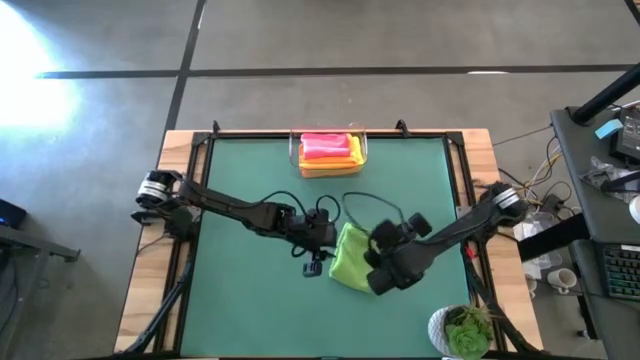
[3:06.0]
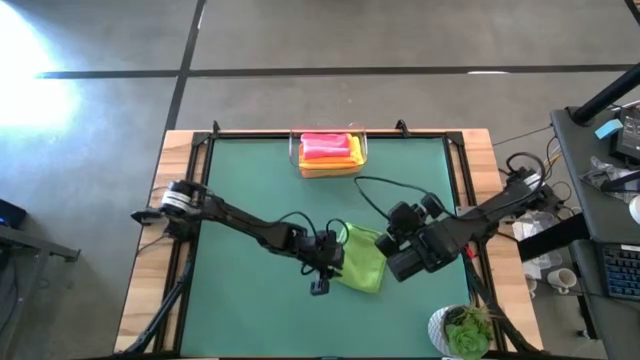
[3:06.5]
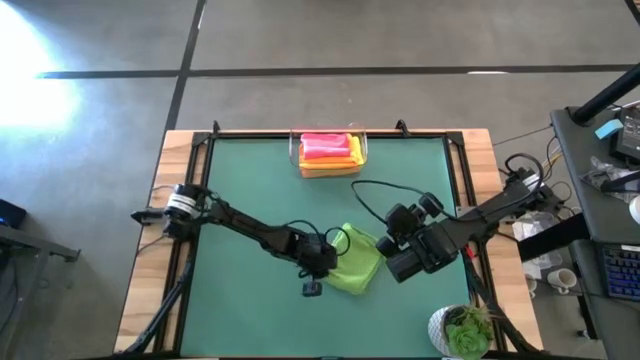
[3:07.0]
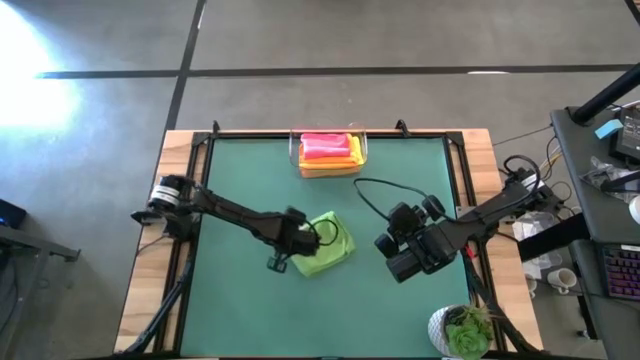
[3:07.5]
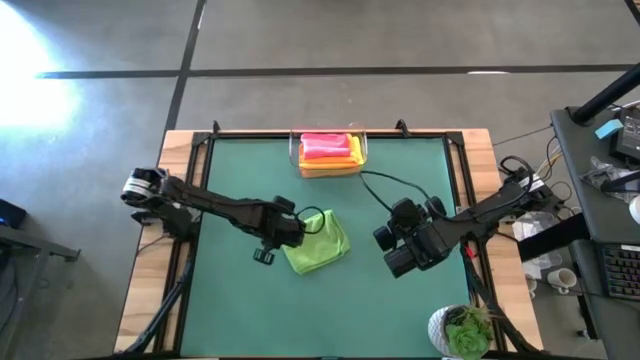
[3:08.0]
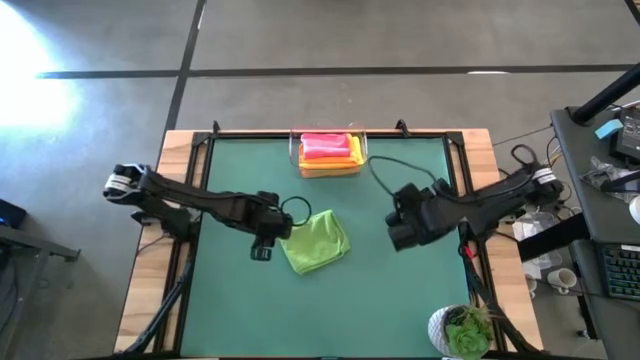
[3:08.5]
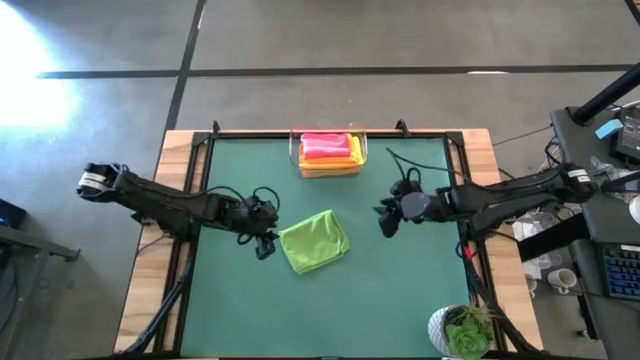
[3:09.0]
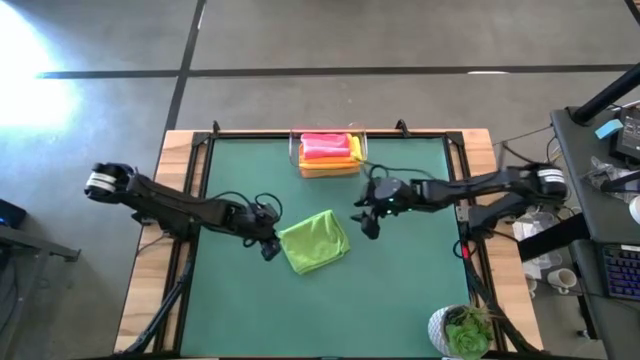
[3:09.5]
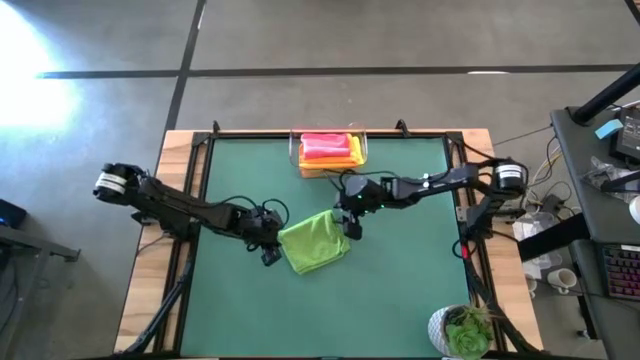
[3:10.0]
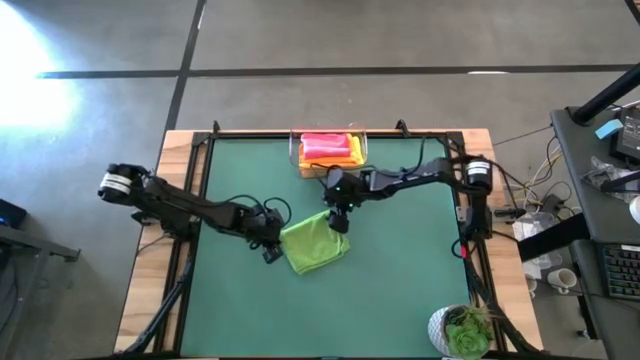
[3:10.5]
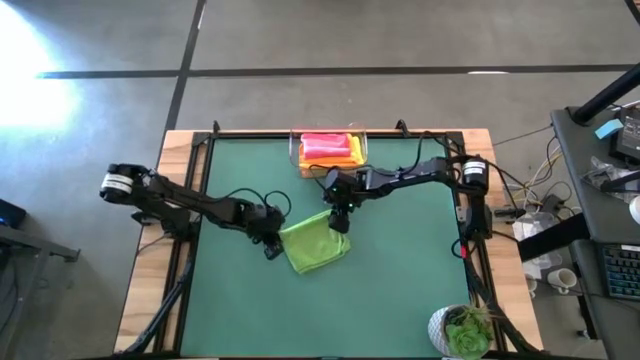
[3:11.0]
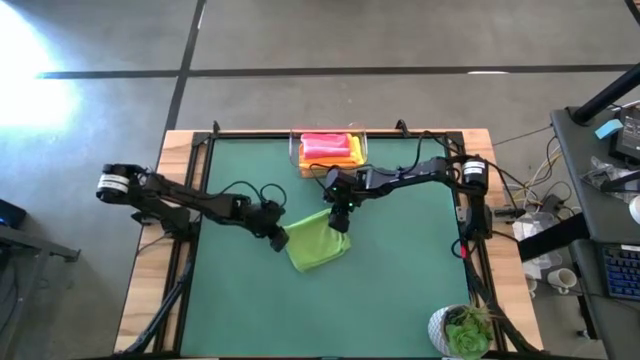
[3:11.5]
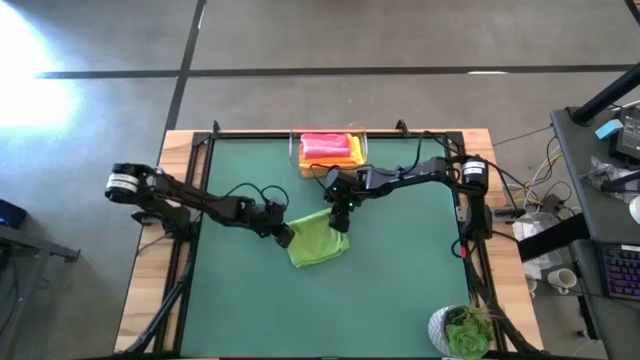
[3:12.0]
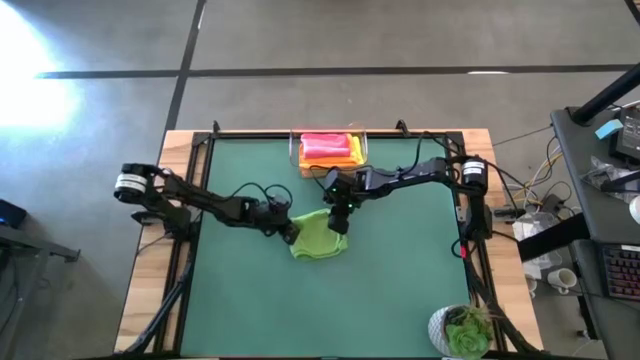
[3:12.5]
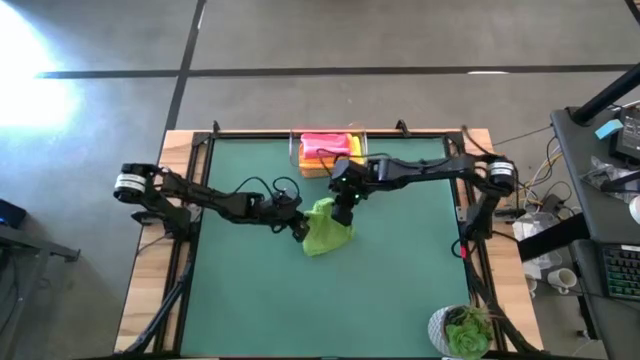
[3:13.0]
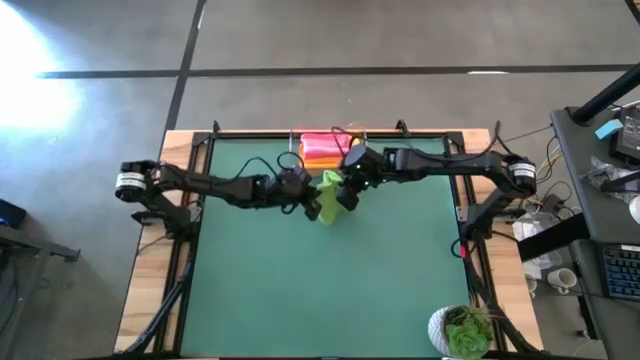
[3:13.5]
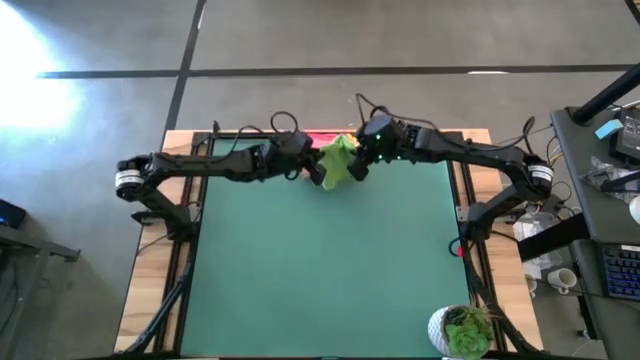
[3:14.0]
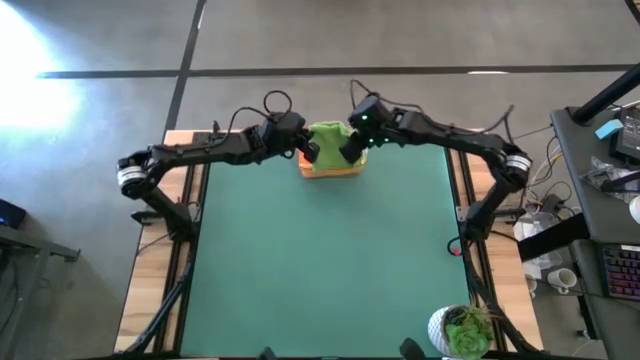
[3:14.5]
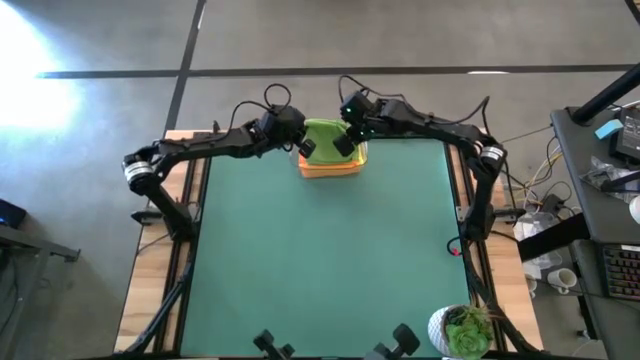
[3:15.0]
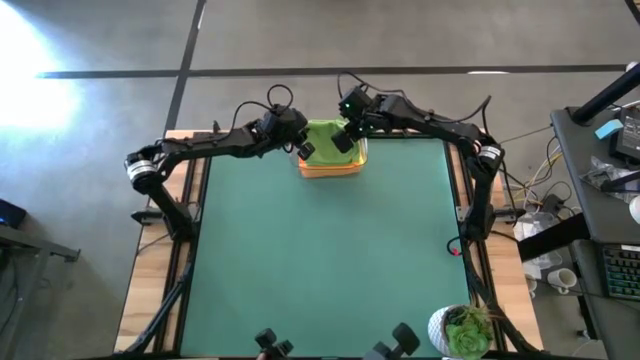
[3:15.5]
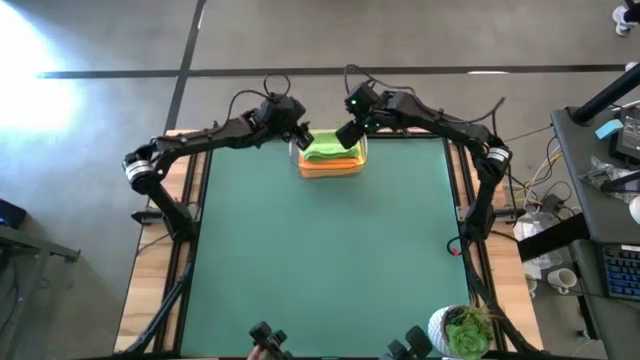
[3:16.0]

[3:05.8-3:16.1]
Task: Fold microfiber towels
Stack the green microfiber towel on top of the pink microfiber towel

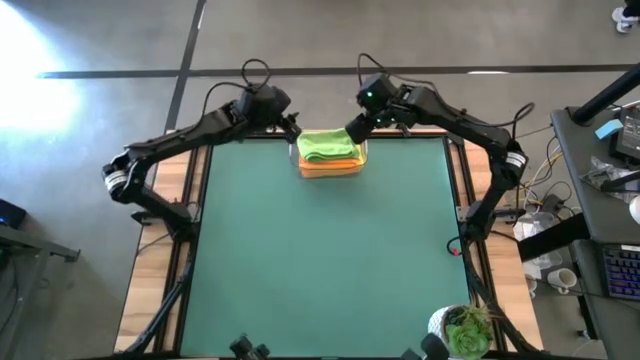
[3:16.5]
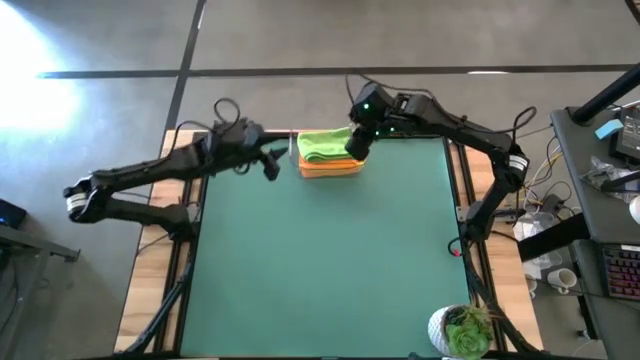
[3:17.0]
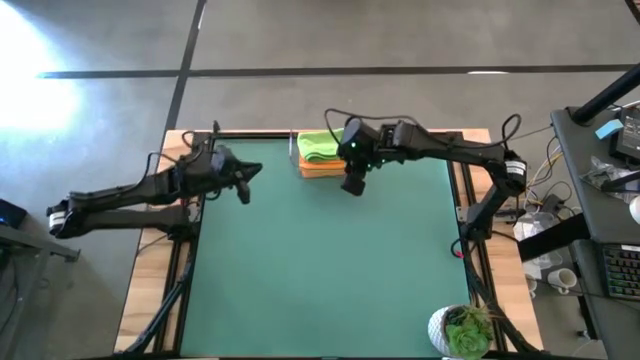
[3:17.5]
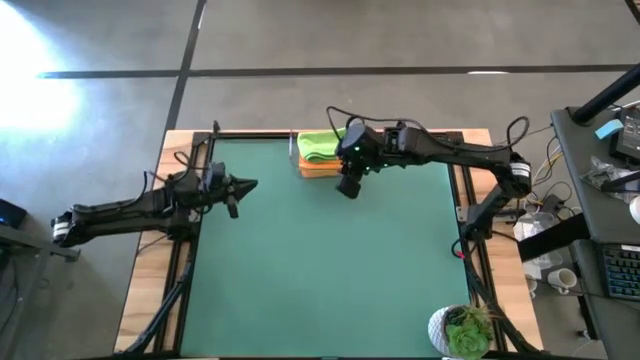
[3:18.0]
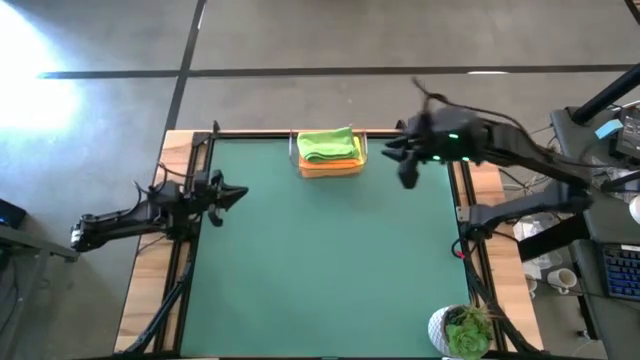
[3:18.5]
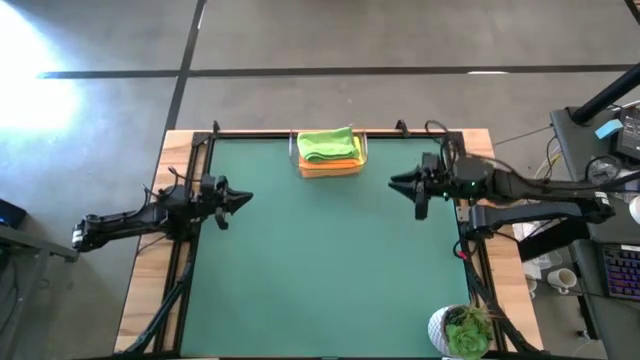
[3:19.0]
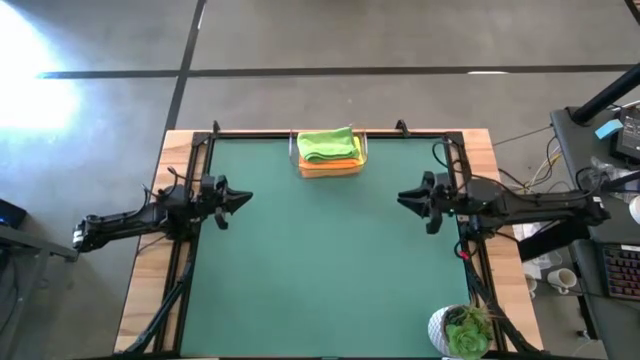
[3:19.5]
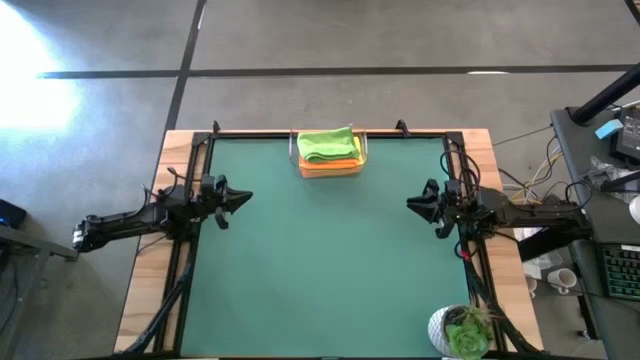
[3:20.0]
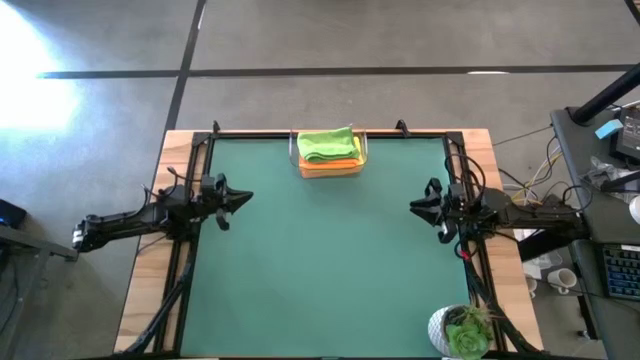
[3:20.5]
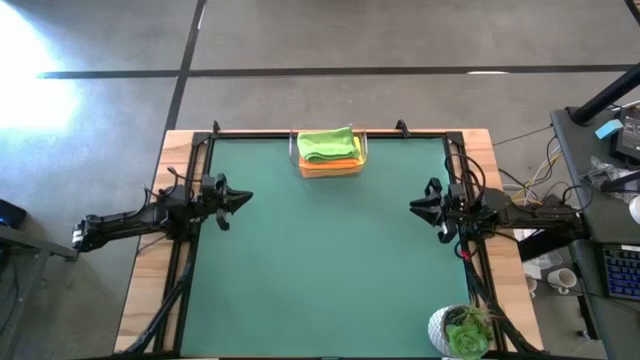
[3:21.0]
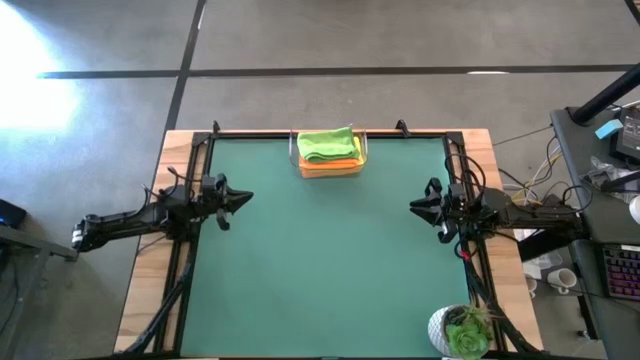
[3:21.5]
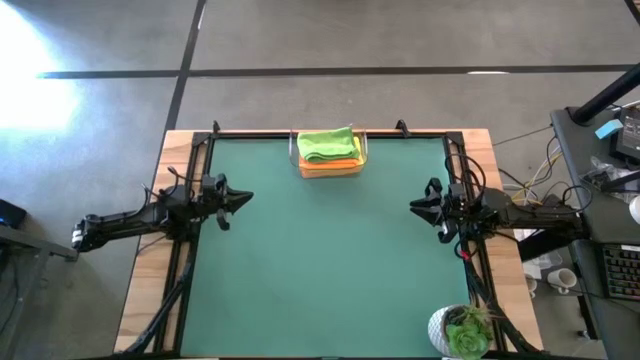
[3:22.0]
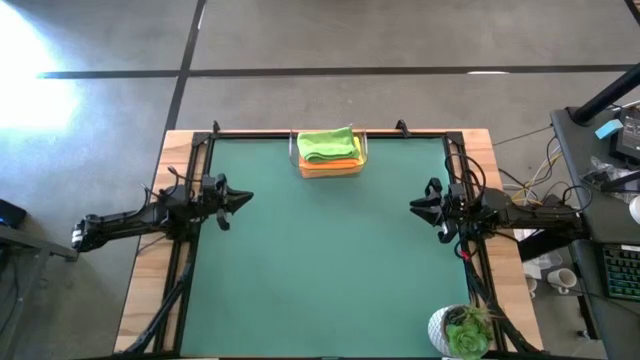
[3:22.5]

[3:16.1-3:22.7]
Return to Home Position

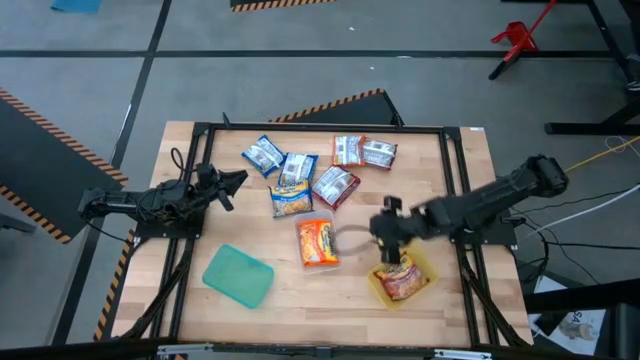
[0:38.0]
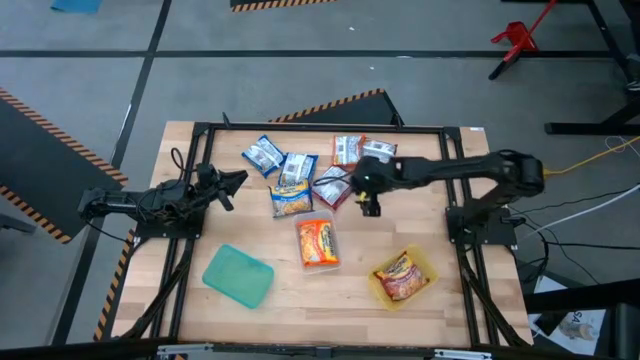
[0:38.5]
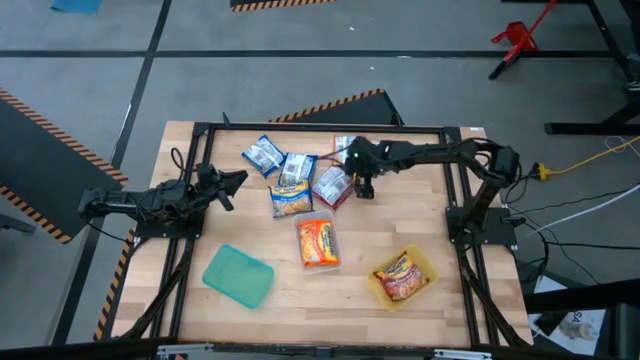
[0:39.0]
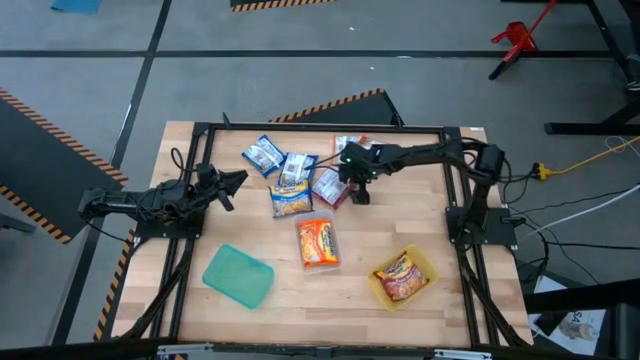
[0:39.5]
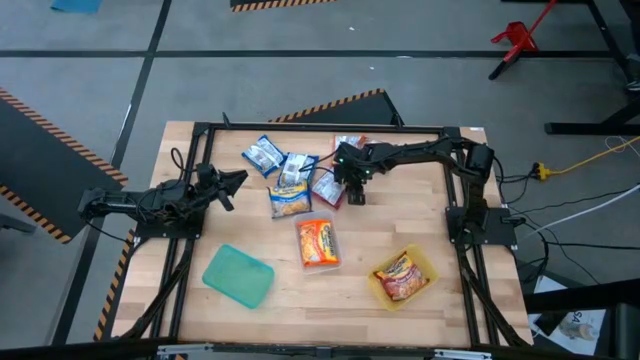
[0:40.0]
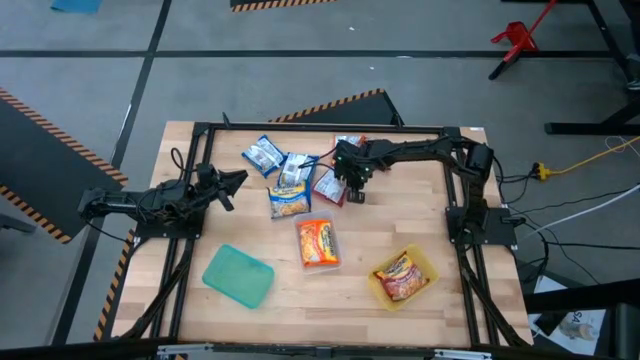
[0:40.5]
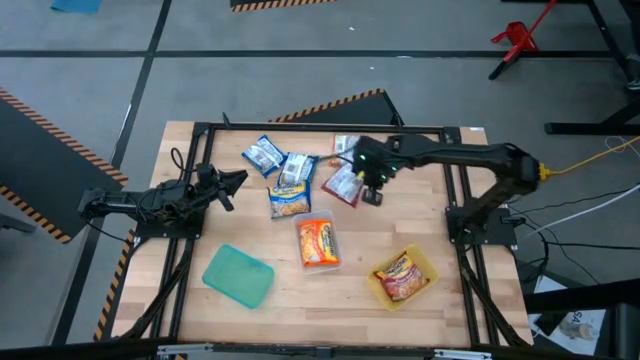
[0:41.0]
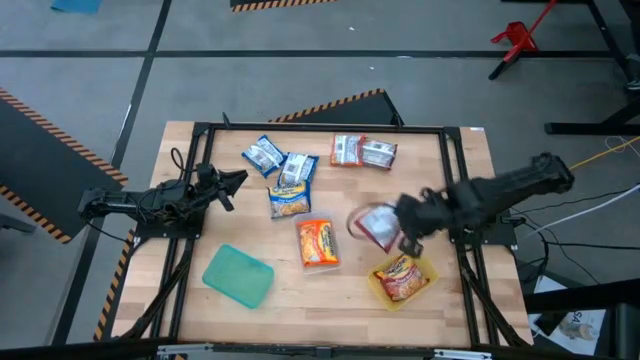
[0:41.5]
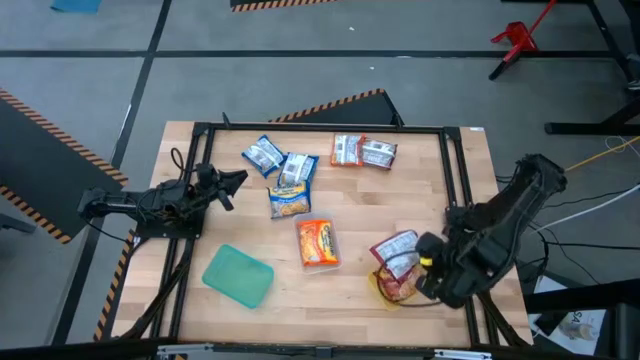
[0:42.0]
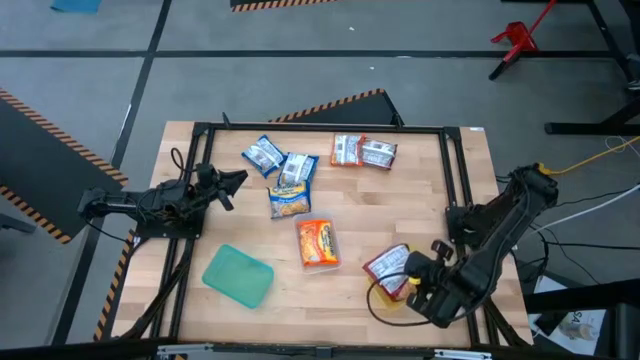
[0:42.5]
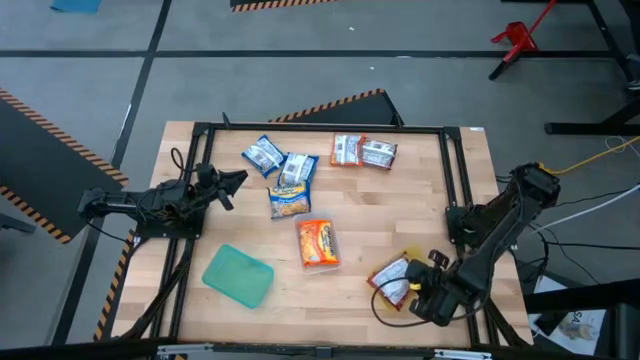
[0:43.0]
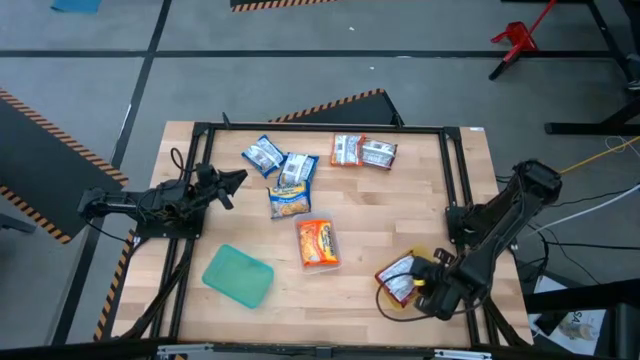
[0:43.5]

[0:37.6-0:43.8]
Task: Sort Maruchan noodles
Put the bottom red noodle pack into the yellow bin
